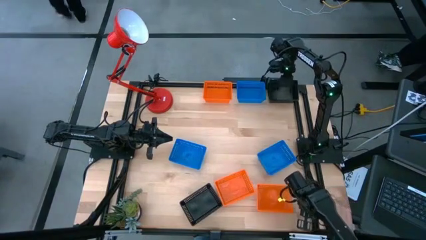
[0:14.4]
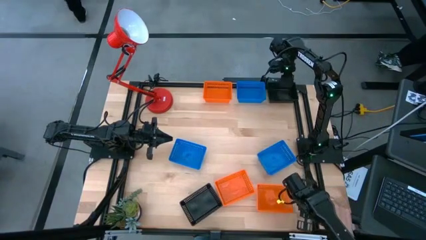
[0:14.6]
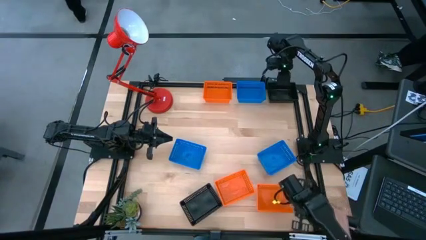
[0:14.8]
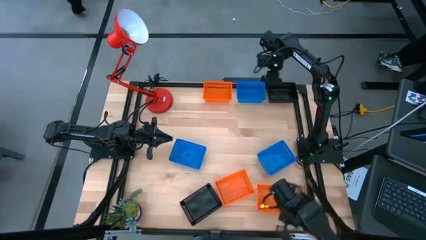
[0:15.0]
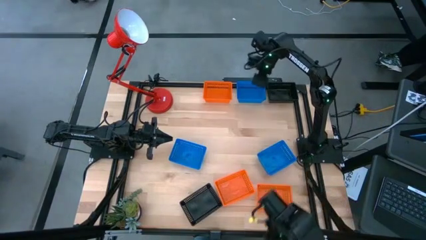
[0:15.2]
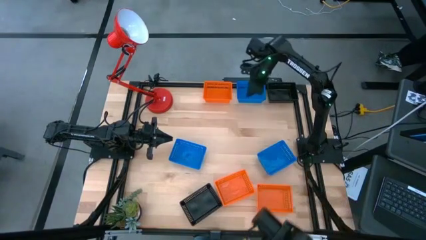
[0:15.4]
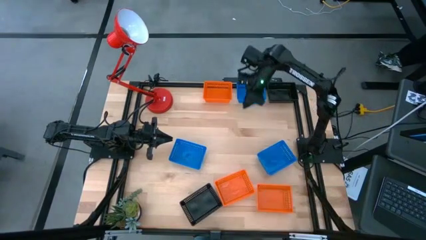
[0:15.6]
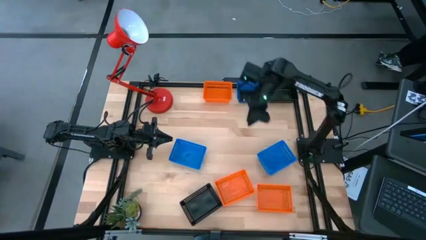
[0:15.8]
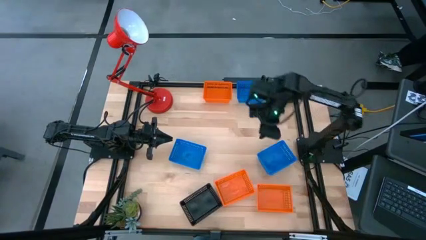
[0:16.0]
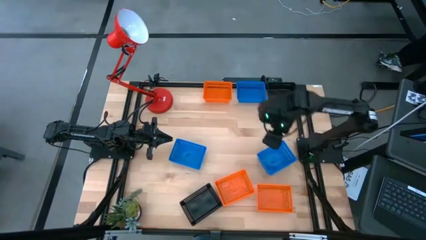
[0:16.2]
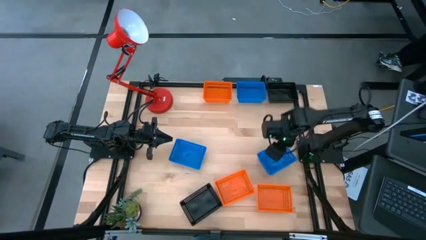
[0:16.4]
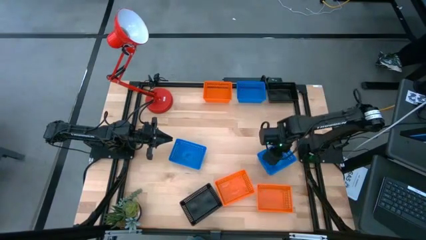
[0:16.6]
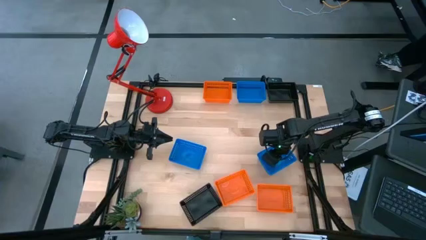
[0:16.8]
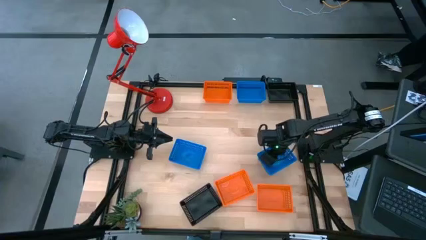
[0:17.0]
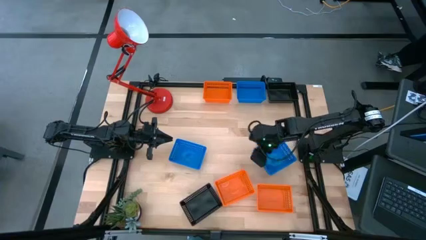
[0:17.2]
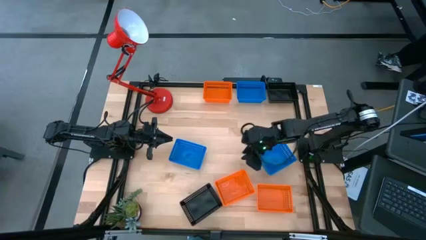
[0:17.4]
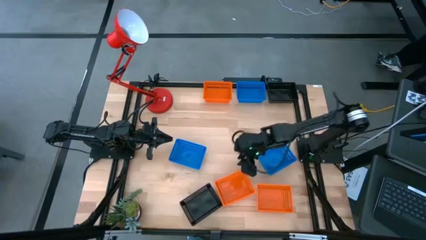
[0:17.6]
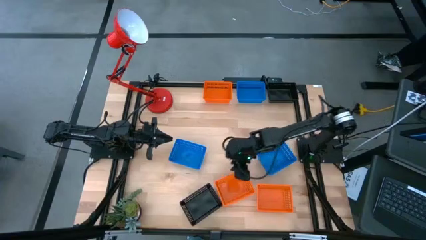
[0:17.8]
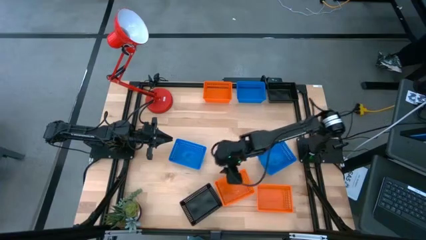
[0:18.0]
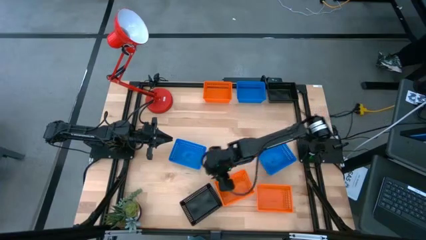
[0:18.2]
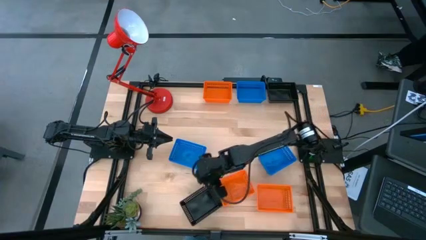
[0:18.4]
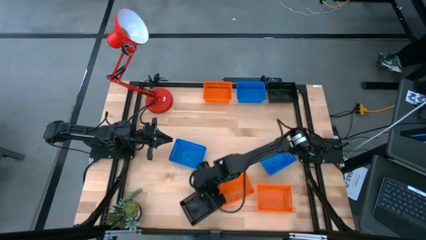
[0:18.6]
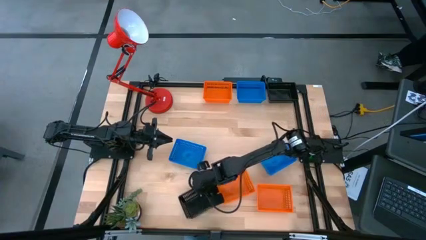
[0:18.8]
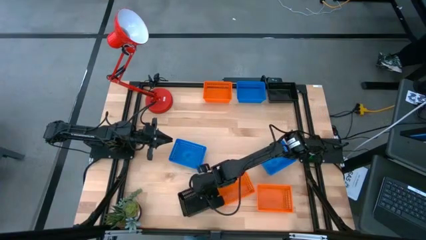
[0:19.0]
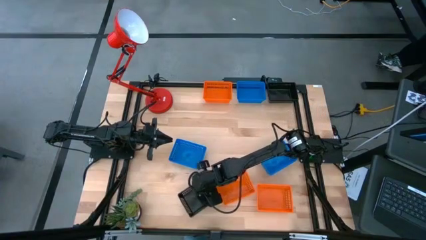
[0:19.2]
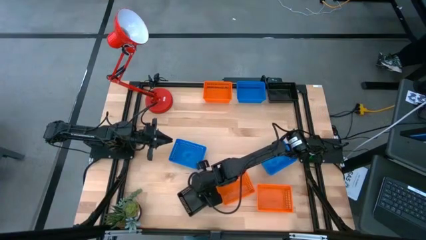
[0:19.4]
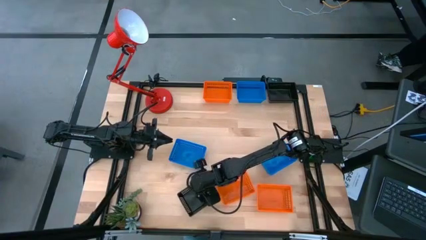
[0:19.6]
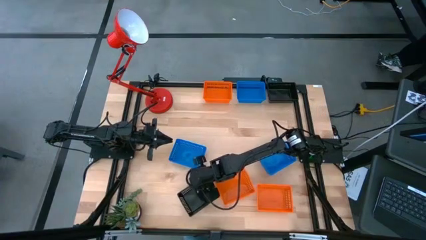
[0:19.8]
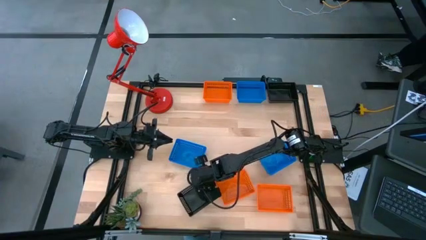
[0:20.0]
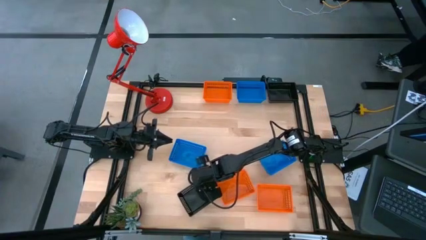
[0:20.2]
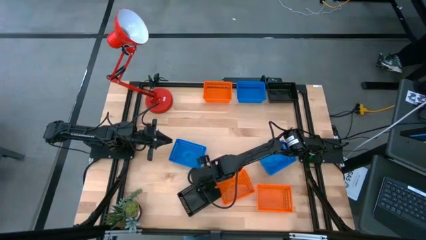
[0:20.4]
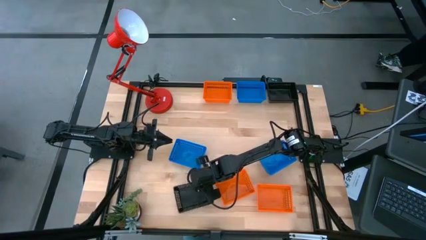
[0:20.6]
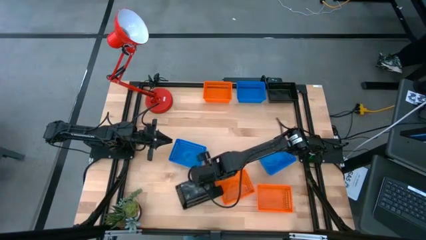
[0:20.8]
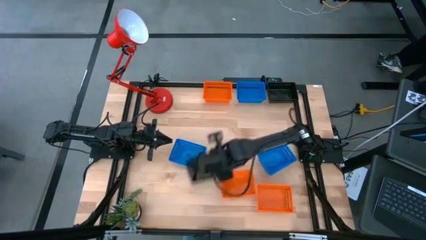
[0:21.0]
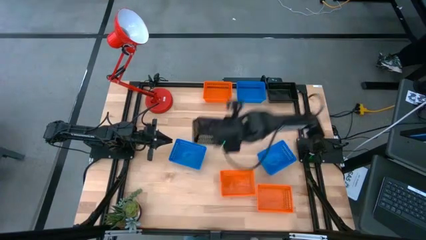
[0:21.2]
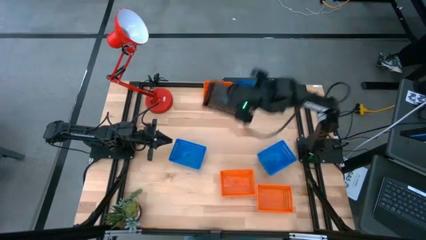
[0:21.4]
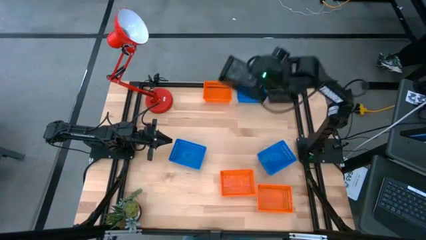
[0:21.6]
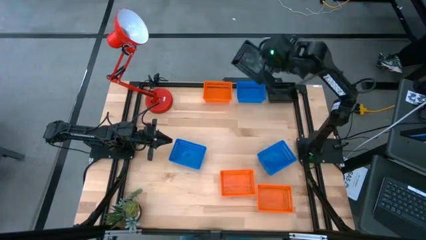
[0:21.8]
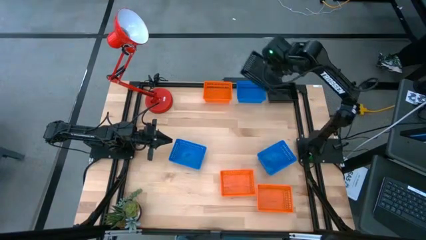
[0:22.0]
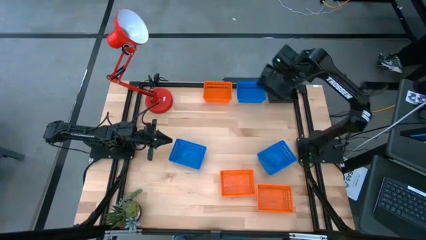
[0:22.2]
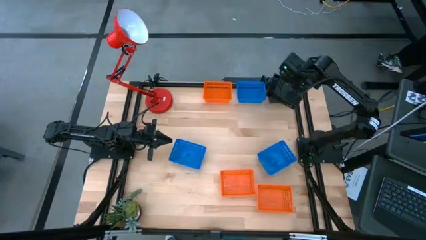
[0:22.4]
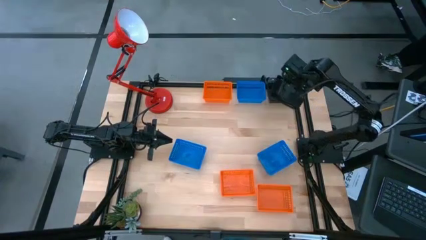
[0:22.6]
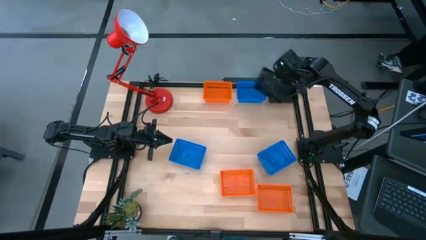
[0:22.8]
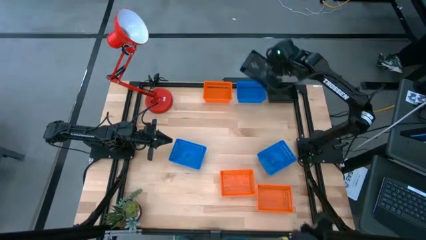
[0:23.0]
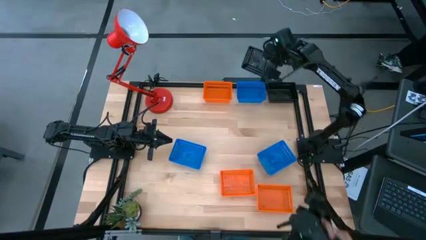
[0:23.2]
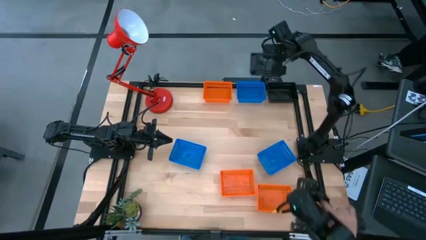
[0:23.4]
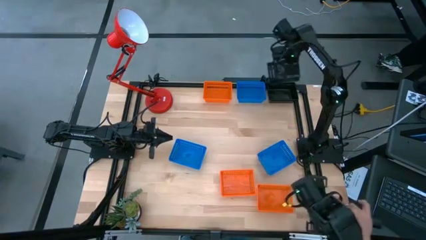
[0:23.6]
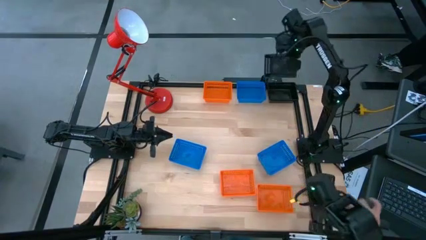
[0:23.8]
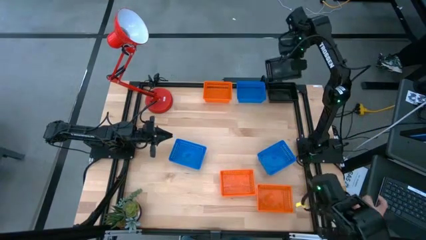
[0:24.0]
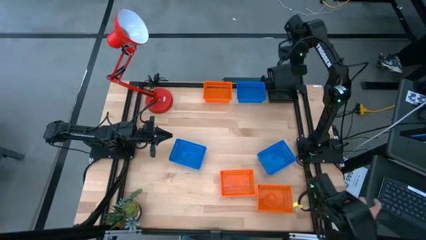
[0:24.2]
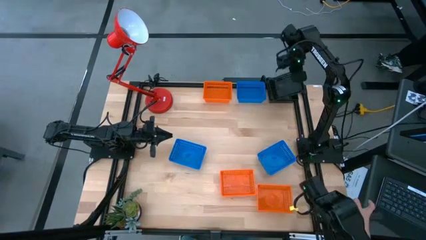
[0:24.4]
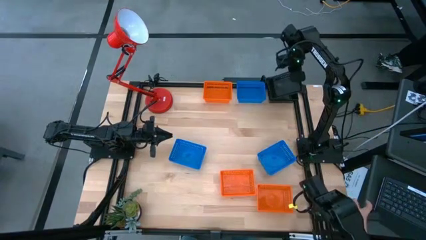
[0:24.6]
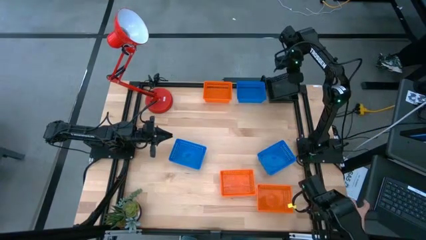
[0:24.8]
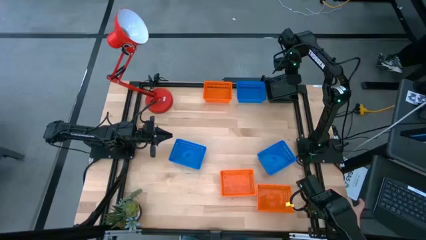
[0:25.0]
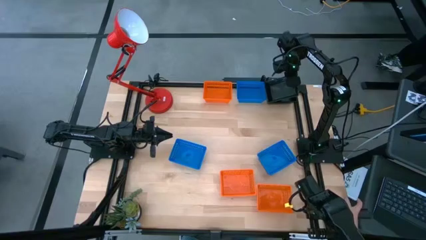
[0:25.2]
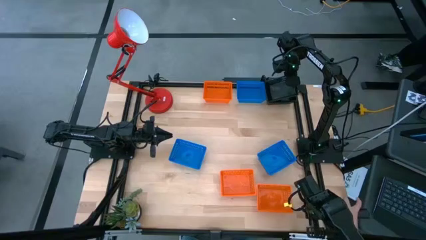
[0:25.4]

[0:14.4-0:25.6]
Stack the bottom black bin on the top black bins

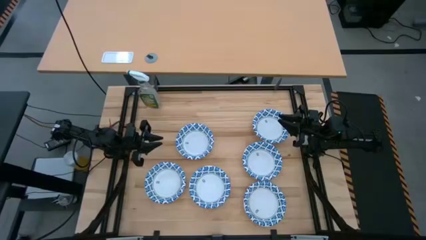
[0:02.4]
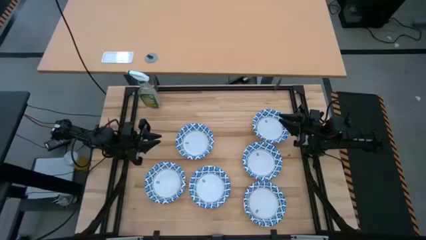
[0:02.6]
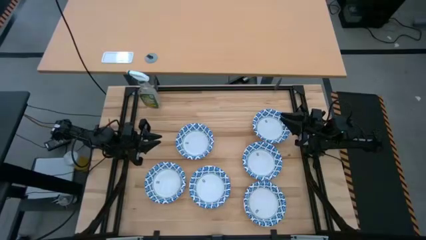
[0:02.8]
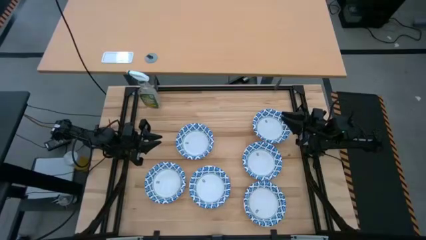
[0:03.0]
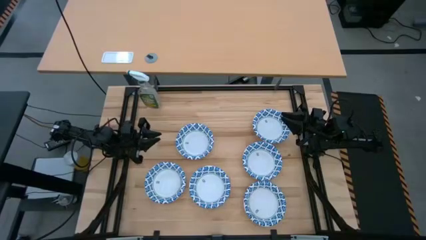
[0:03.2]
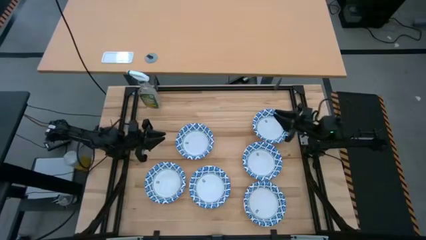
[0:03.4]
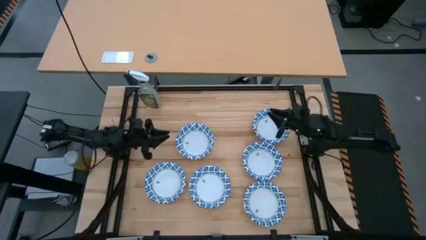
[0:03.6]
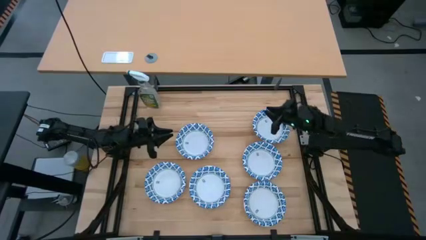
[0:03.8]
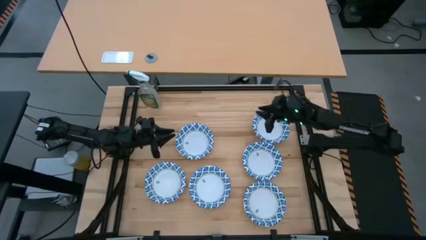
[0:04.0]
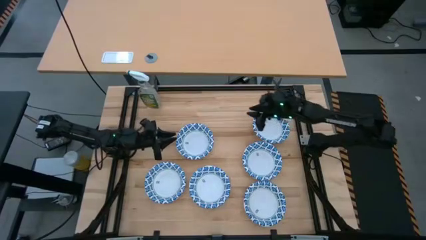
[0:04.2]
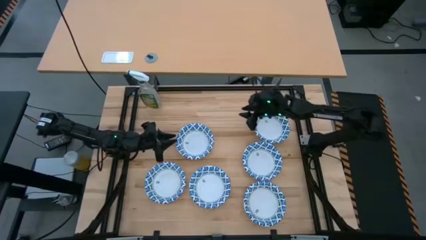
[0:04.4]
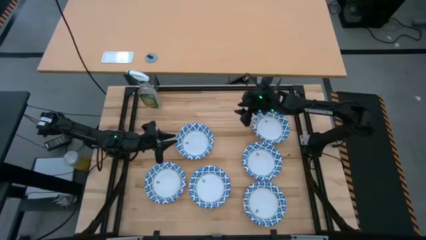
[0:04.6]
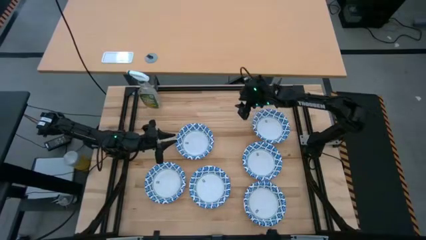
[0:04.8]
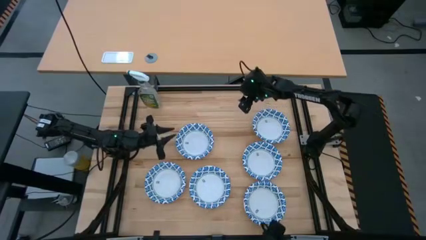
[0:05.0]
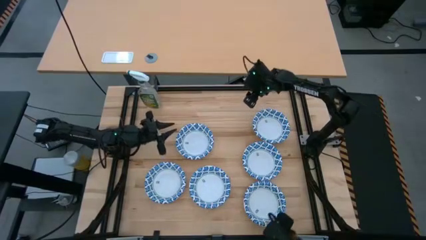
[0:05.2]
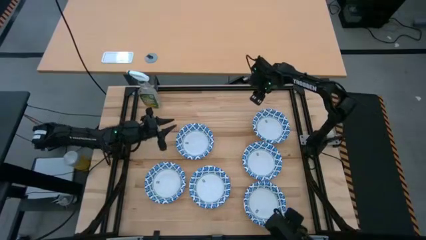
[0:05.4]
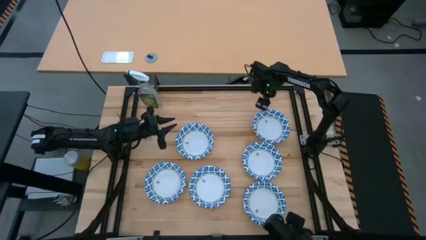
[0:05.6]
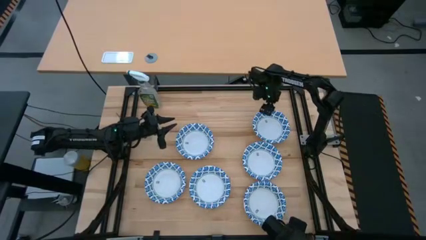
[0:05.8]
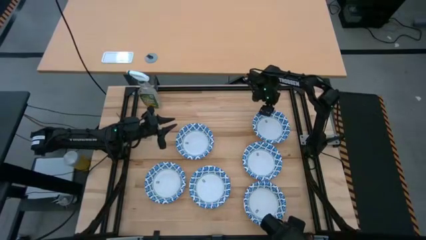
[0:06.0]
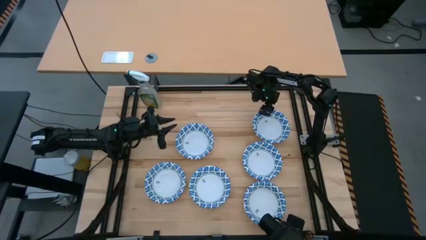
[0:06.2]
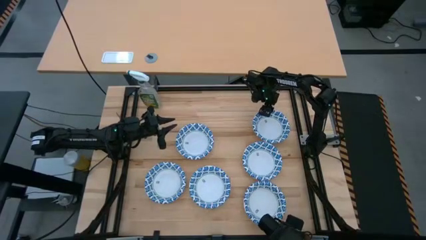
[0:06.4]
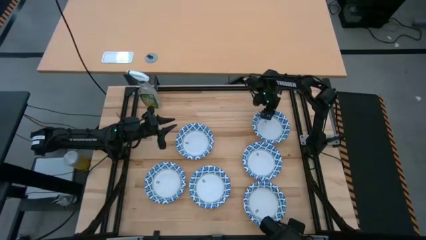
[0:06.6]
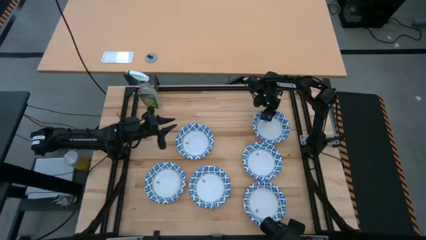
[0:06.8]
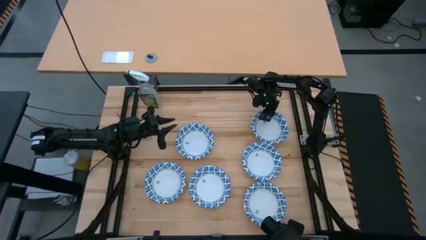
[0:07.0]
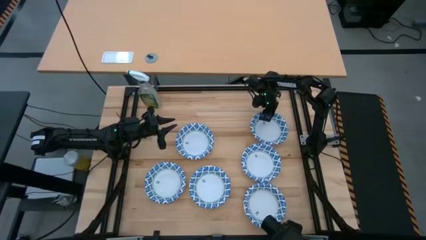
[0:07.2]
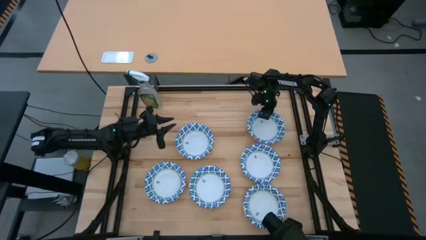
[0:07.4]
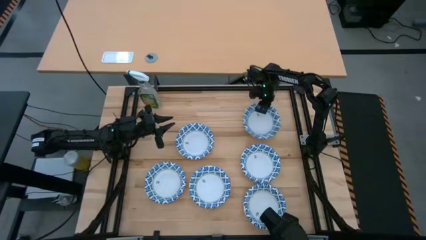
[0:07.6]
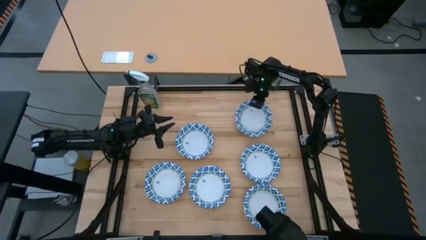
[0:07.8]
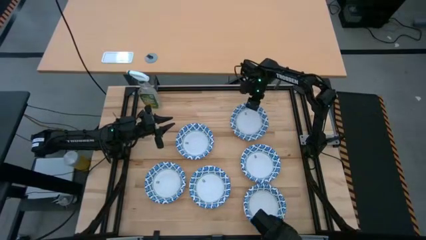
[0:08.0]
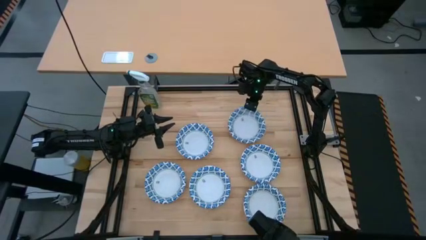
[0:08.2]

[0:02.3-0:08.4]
Put the white bowl on top of the white bowl
